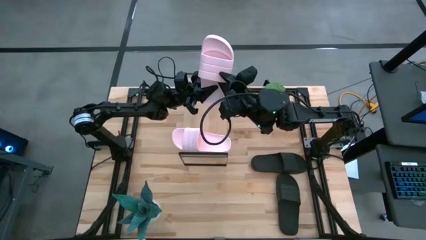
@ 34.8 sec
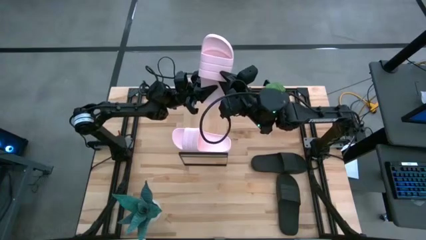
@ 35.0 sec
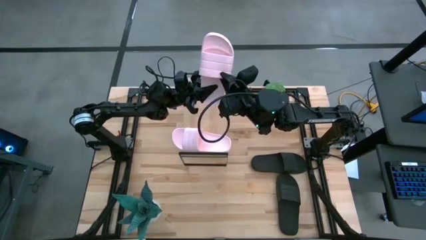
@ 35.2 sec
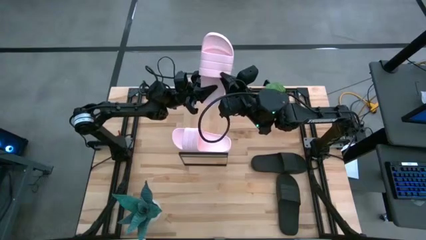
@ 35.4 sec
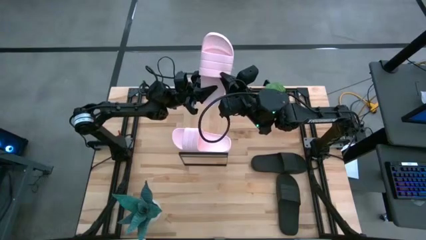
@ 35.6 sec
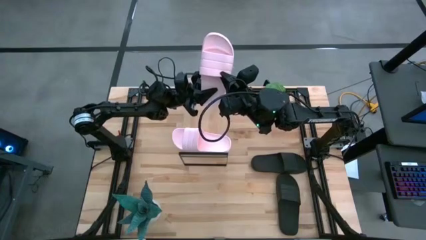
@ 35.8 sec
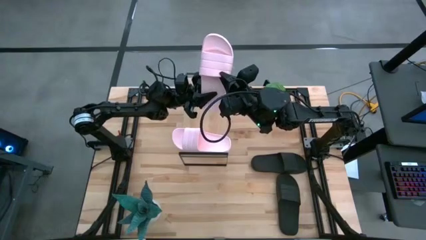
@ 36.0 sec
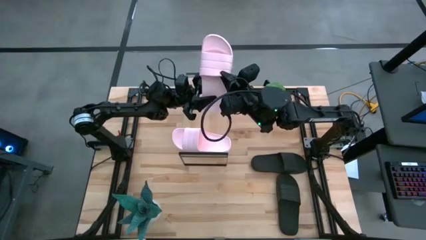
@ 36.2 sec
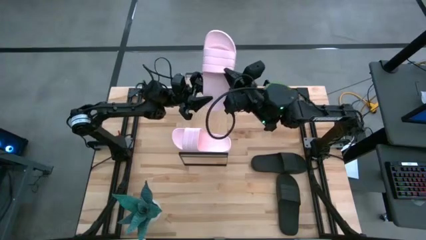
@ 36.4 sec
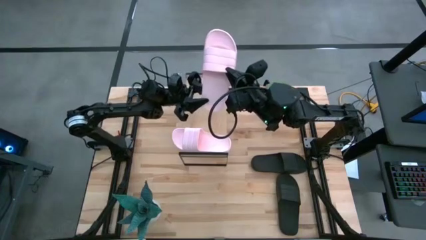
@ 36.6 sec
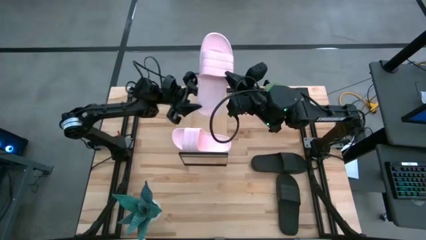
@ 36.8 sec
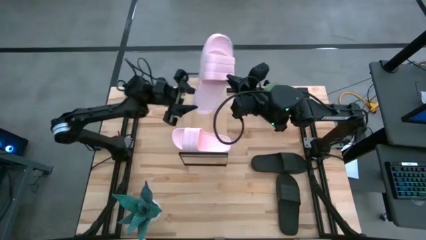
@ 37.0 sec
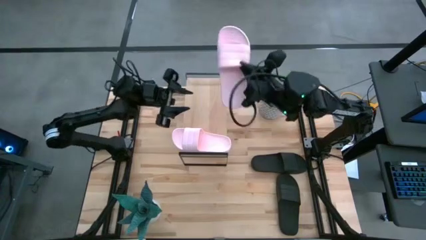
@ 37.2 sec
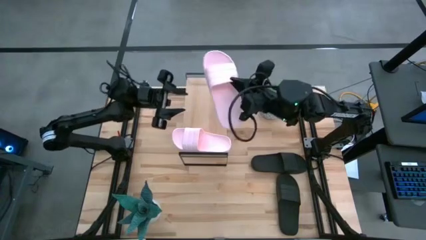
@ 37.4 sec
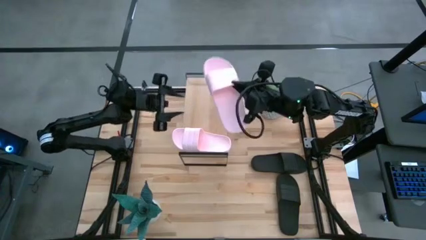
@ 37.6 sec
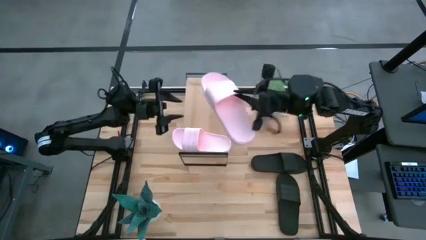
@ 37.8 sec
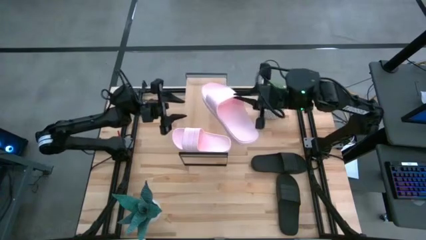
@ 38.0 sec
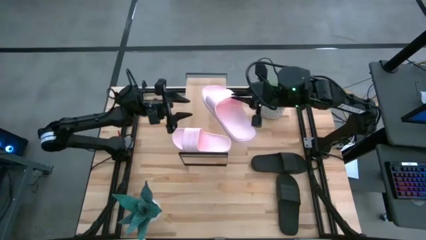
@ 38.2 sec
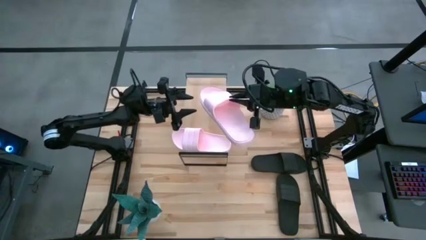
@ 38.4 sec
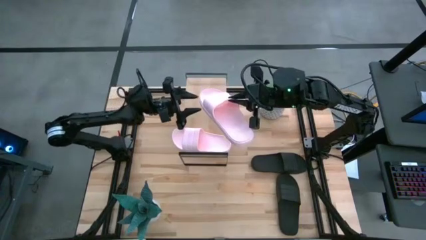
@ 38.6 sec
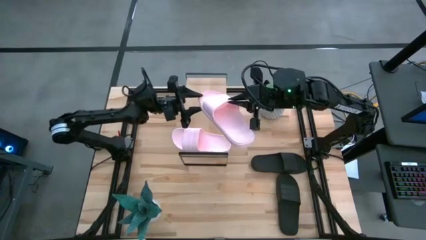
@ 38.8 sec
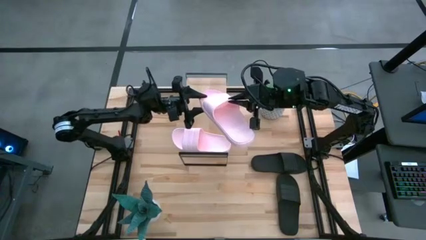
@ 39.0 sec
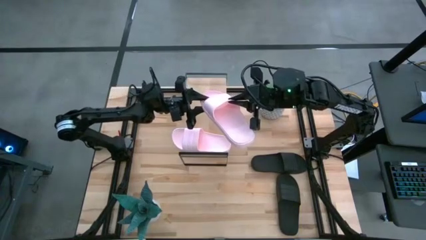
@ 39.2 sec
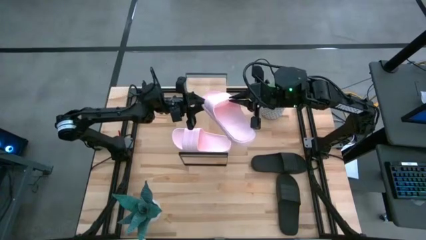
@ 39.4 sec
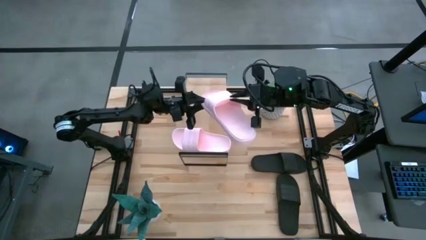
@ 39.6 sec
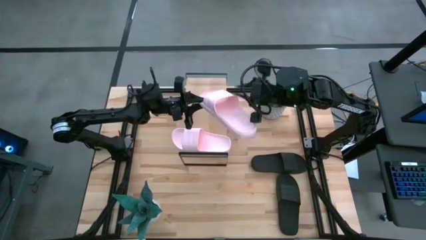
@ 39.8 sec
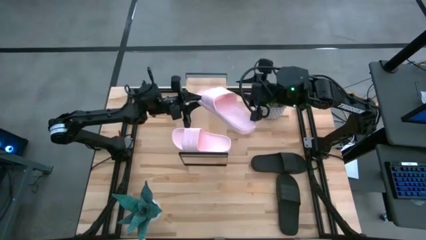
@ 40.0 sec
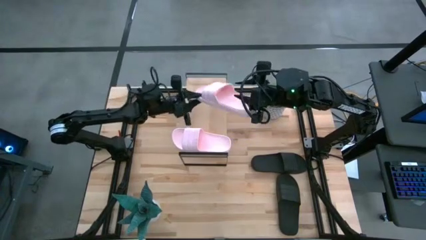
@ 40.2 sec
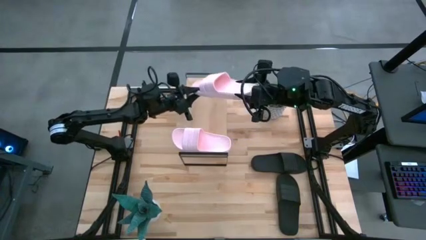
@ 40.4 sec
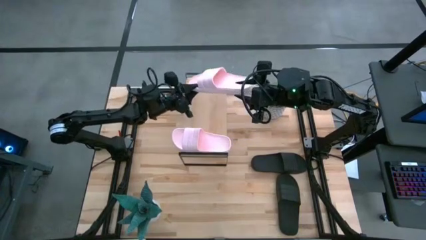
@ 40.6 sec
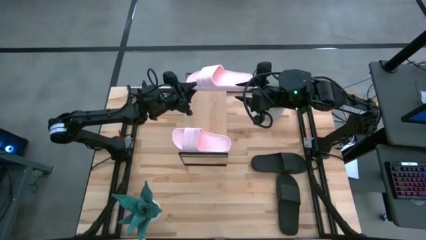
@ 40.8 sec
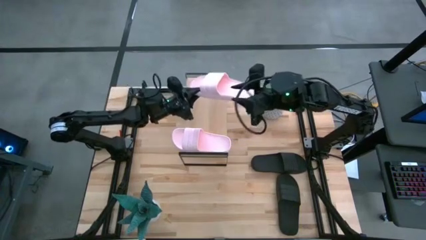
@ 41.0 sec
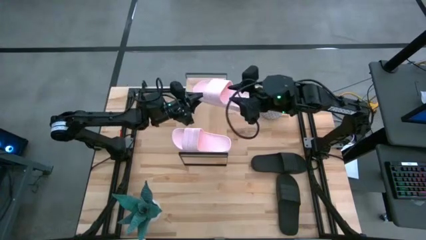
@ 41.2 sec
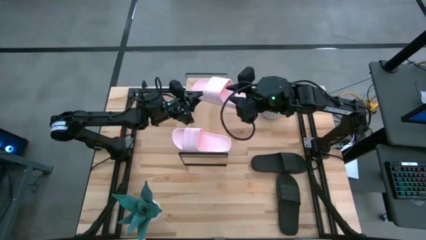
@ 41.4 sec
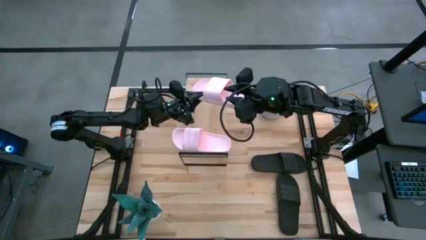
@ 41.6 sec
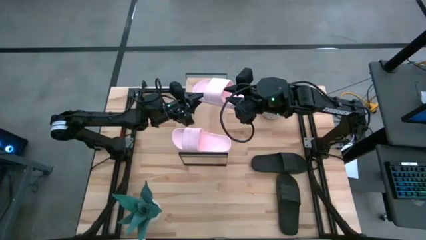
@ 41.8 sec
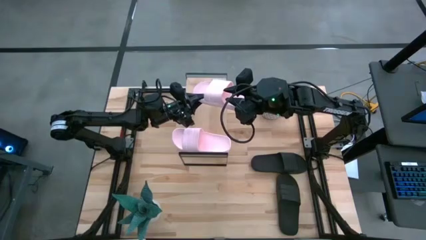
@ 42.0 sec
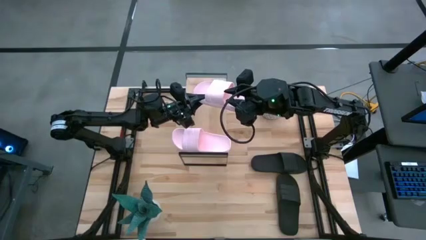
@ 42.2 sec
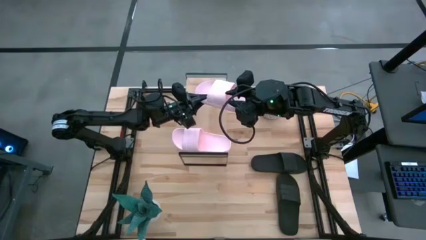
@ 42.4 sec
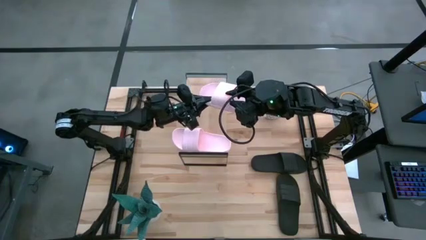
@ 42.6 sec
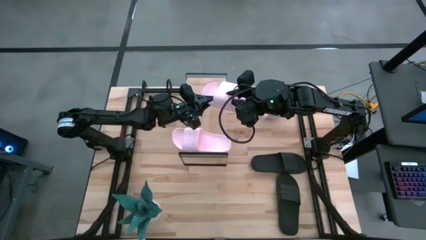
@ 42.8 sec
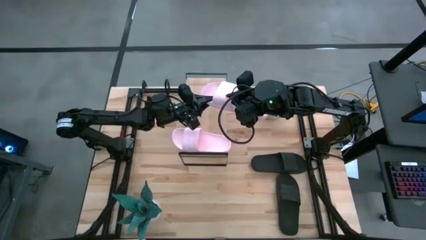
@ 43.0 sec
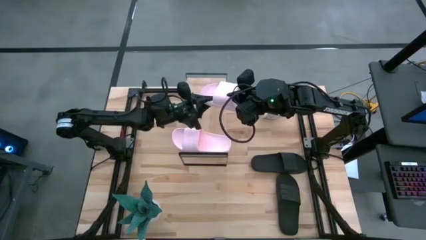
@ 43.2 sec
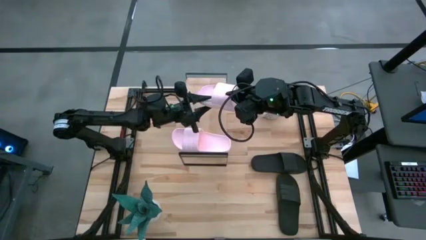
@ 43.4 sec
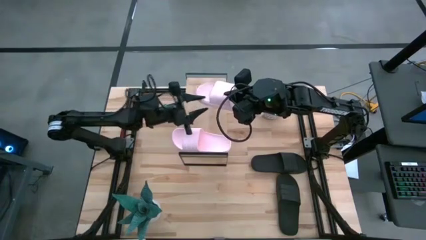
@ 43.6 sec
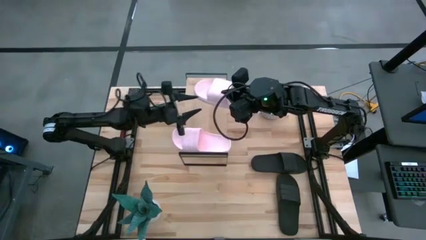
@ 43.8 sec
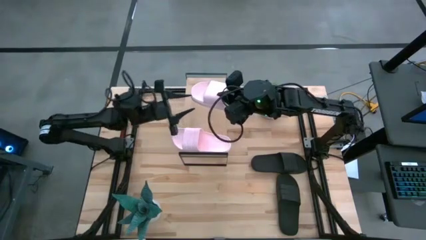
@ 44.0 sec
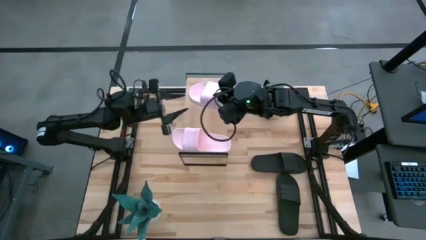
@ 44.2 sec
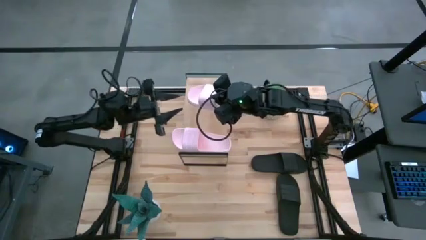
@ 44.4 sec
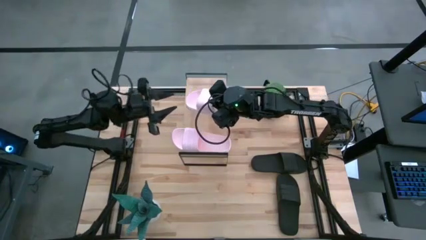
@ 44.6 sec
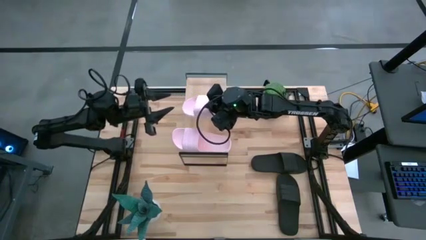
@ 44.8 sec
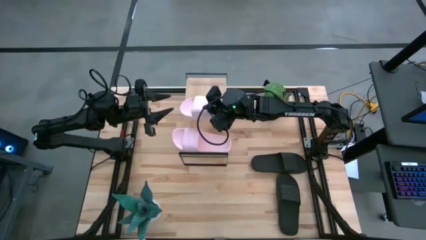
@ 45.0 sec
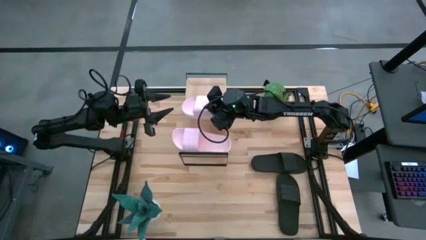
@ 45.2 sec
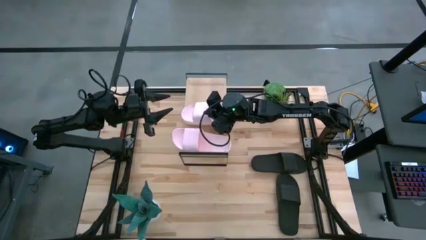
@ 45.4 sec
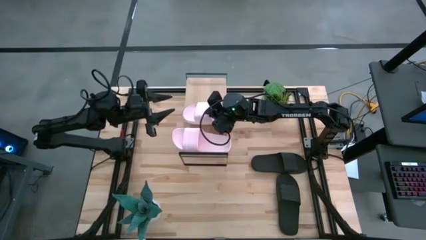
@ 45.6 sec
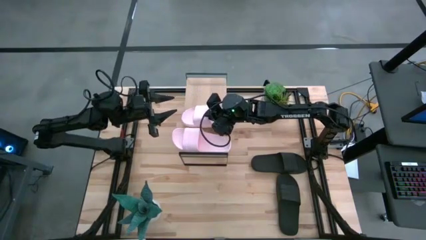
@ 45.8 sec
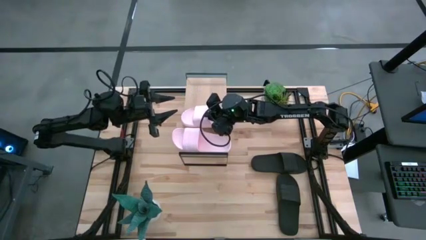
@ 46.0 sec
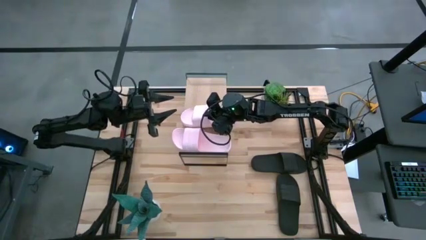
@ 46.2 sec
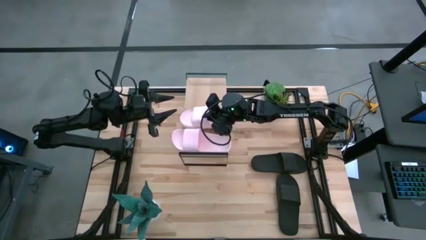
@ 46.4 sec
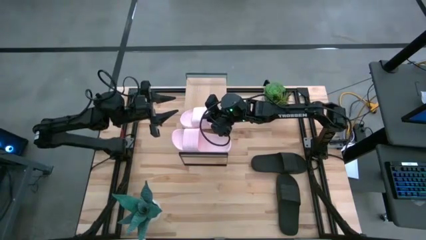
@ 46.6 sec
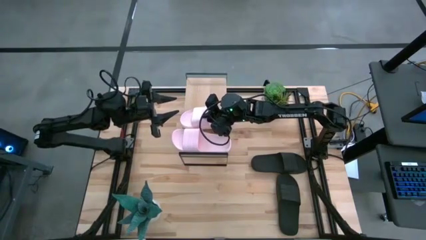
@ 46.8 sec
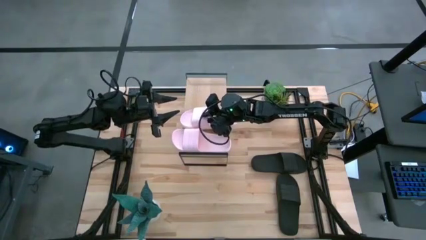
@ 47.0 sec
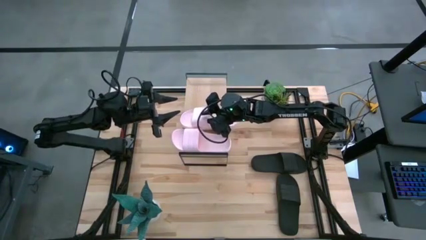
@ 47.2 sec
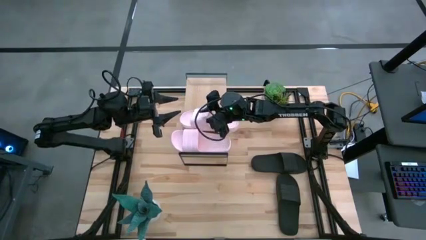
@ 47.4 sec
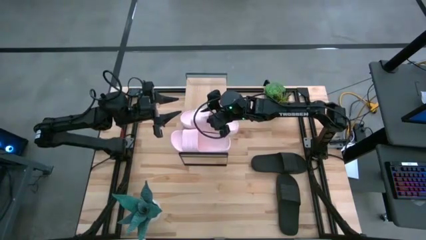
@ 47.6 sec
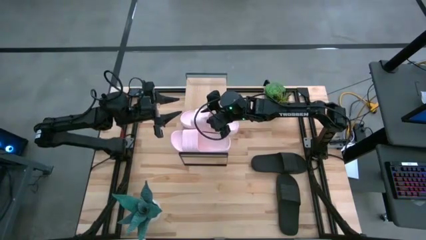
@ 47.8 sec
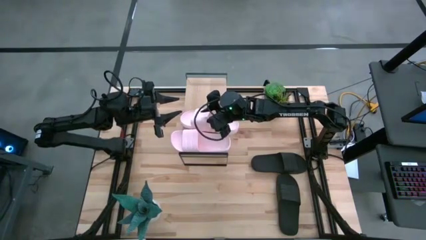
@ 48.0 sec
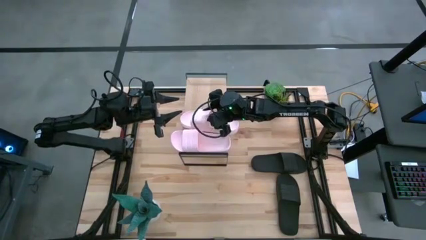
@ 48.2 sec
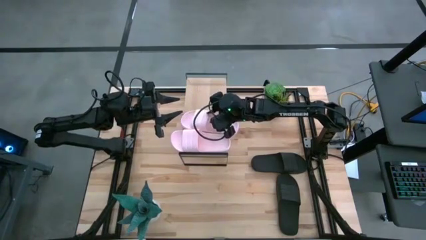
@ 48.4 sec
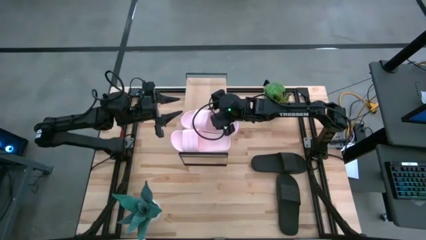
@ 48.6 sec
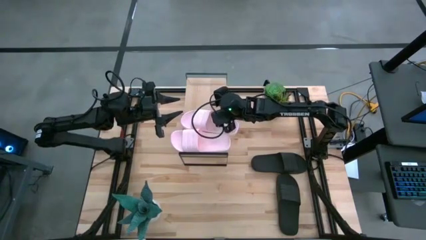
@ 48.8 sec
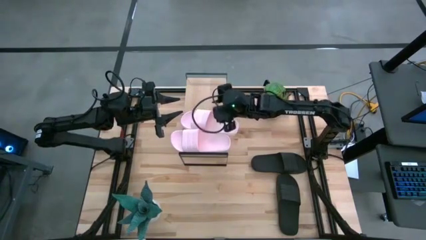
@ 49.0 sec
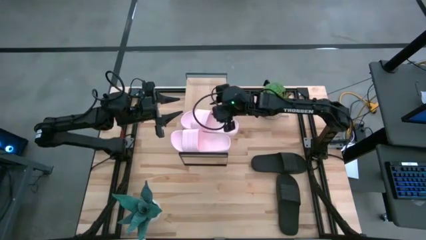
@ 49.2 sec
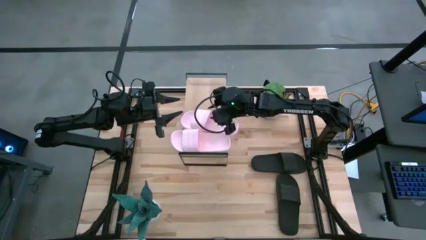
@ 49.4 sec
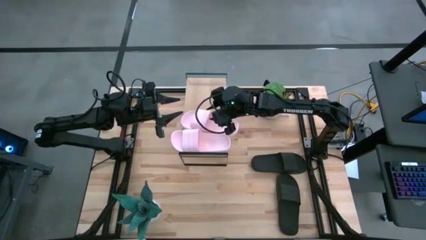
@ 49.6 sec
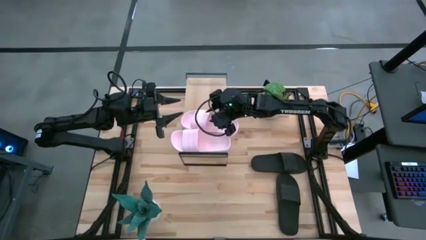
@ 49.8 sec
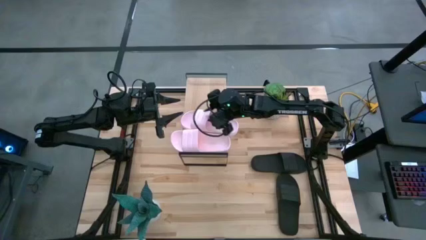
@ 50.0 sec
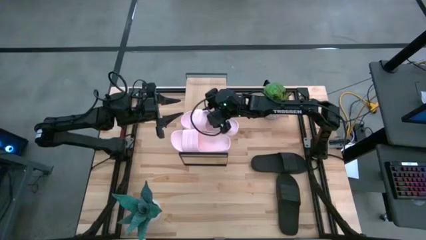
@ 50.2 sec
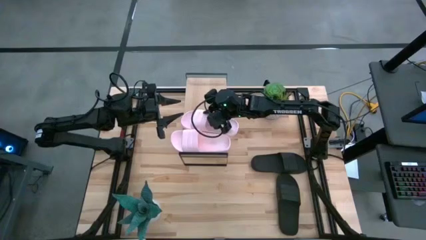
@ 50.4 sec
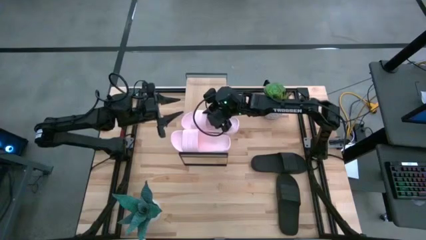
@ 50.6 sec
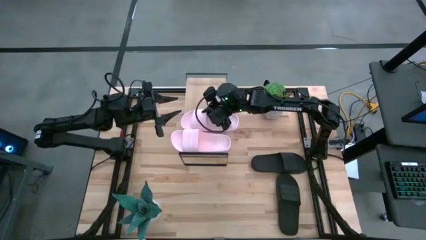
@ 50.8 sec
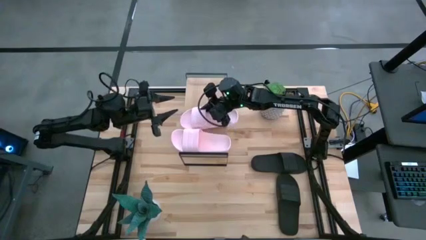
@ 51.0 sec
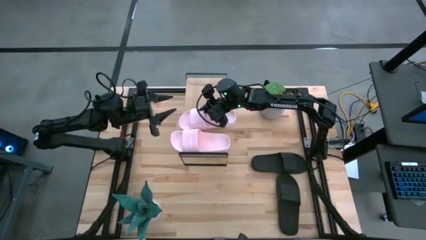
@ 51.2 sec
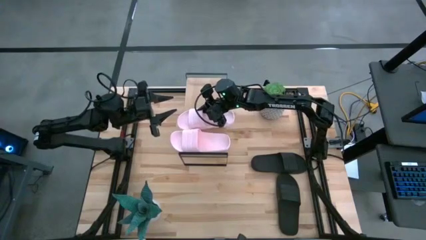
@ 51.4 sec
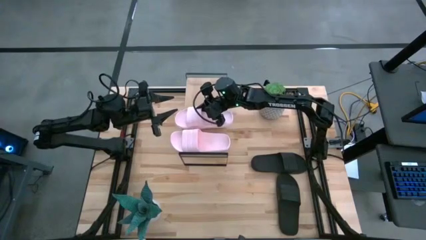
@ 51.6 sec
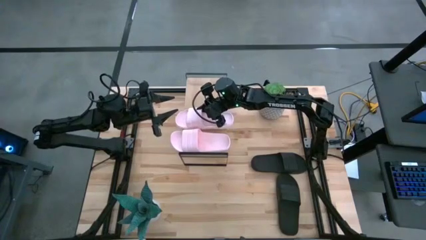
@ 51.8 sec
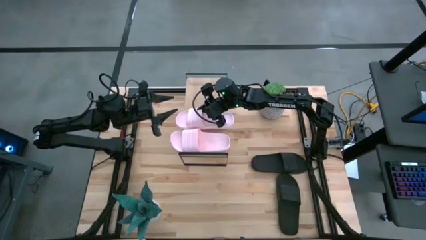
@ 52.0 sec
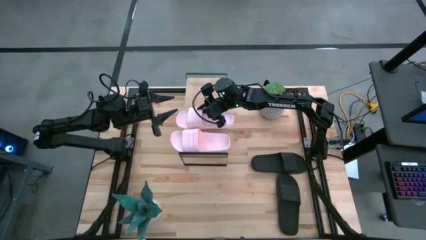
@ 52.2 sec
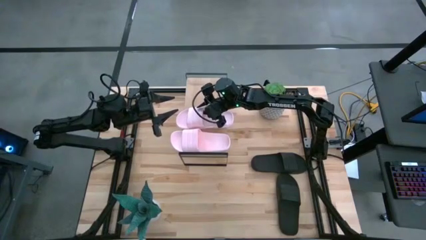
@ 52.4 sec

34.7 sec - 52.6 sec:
Task: Pick and place slides into the shelf
Put the pink slipper on the shelf
